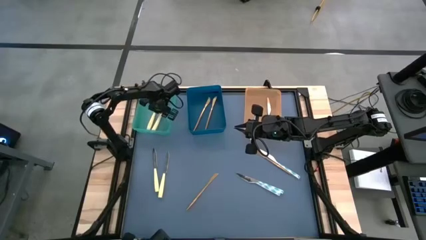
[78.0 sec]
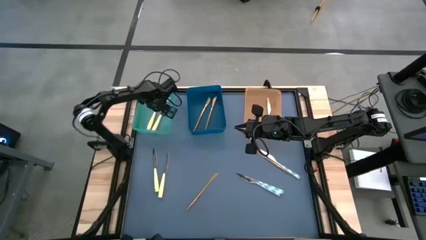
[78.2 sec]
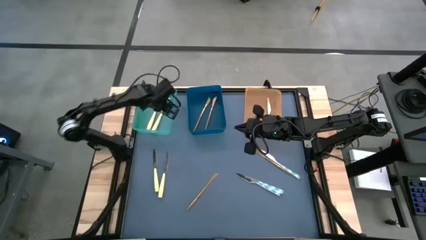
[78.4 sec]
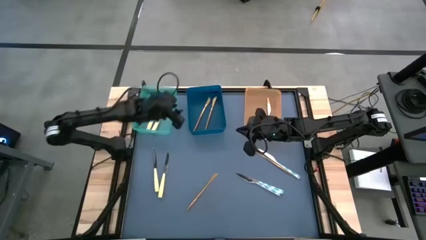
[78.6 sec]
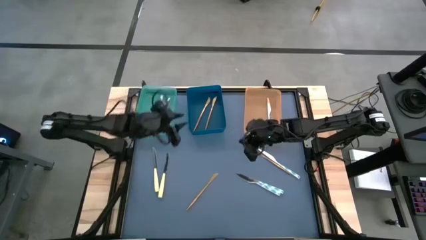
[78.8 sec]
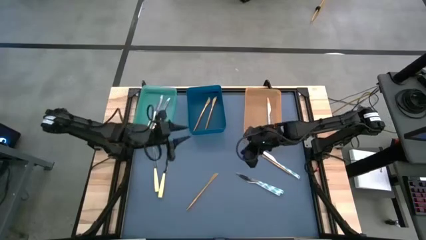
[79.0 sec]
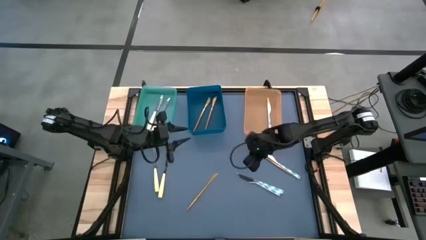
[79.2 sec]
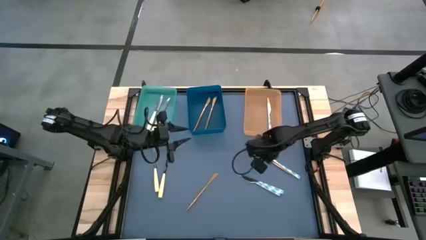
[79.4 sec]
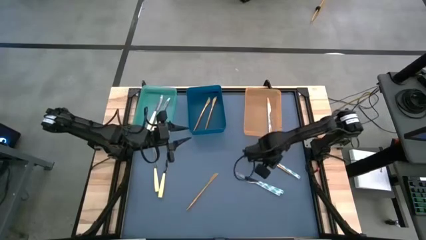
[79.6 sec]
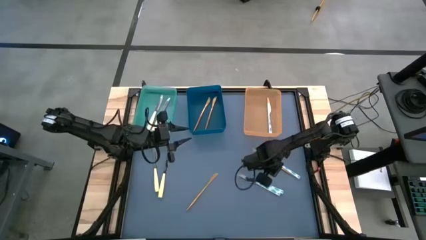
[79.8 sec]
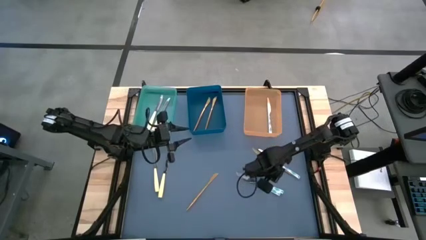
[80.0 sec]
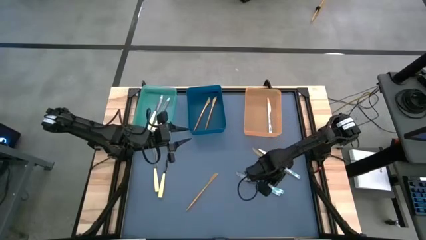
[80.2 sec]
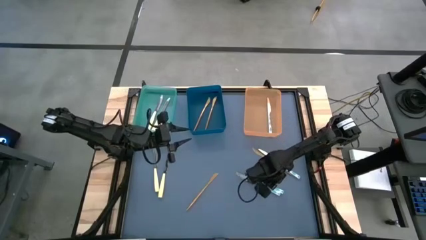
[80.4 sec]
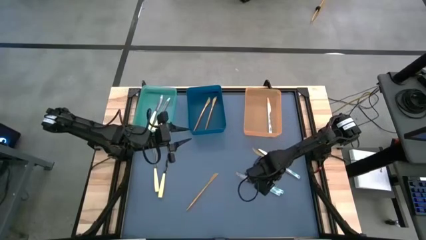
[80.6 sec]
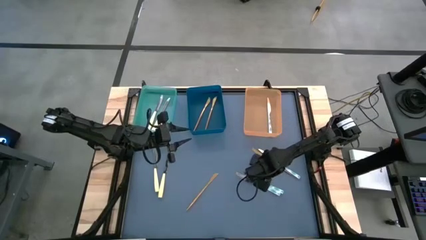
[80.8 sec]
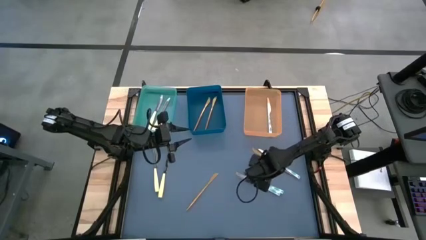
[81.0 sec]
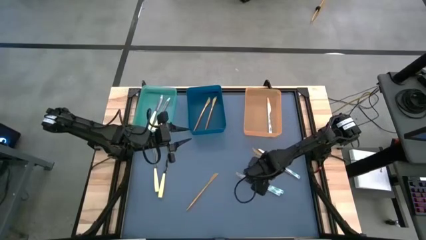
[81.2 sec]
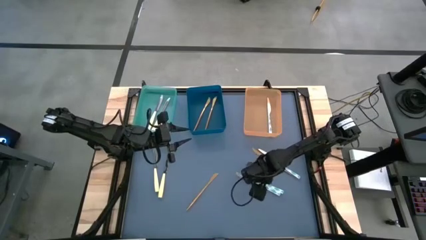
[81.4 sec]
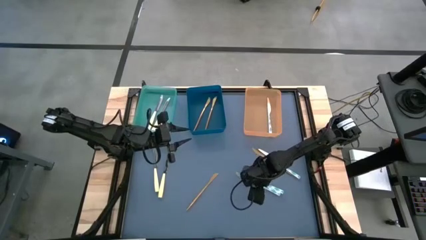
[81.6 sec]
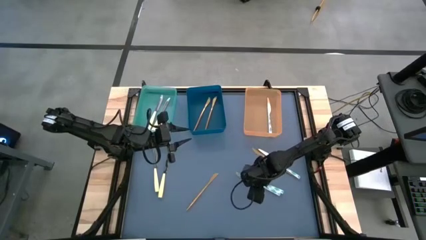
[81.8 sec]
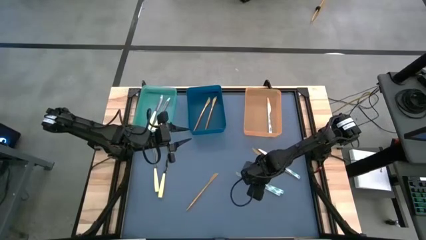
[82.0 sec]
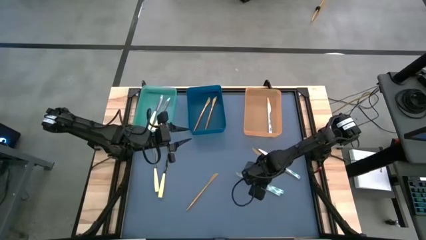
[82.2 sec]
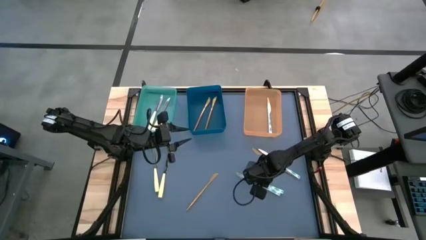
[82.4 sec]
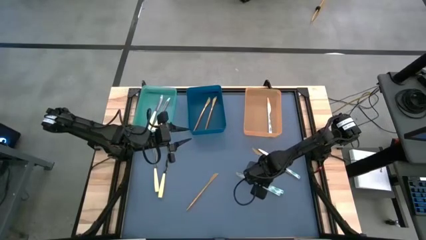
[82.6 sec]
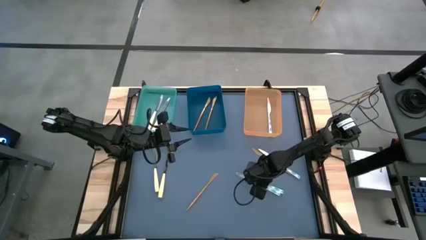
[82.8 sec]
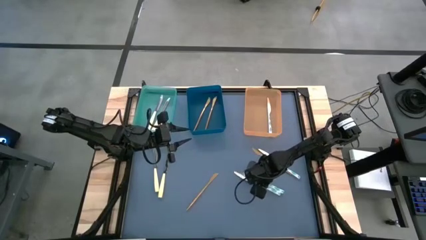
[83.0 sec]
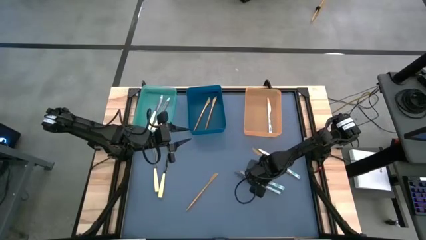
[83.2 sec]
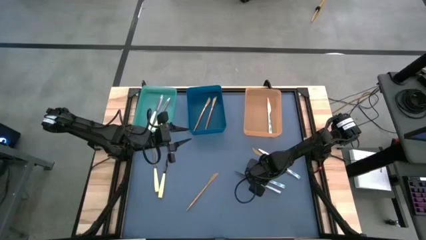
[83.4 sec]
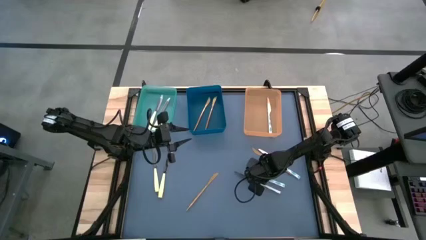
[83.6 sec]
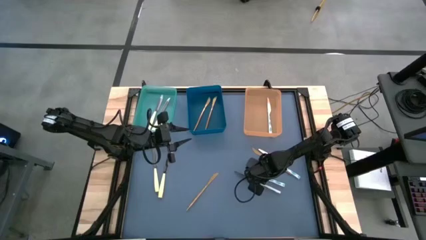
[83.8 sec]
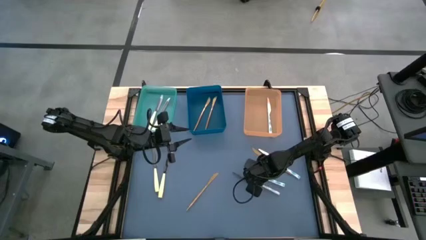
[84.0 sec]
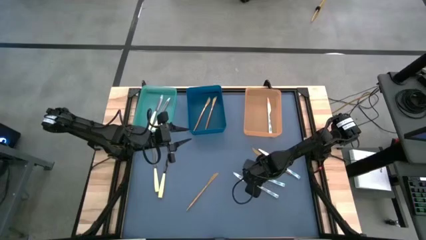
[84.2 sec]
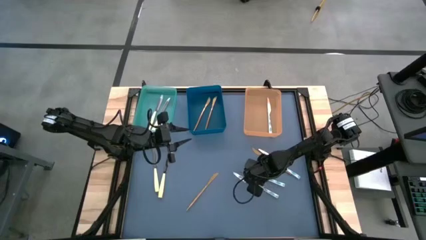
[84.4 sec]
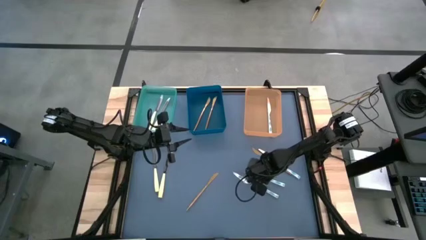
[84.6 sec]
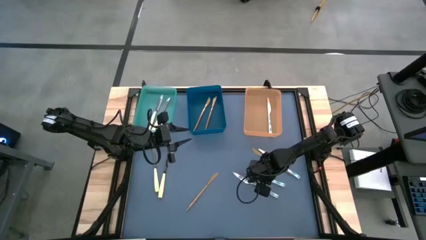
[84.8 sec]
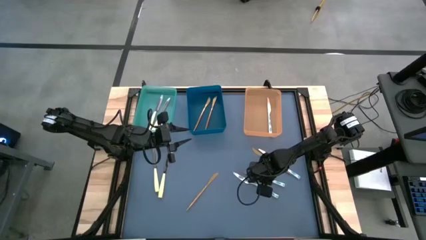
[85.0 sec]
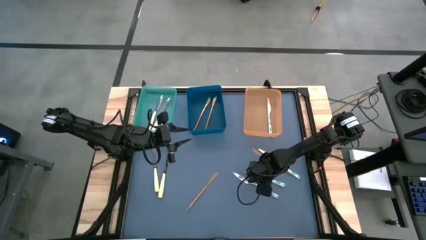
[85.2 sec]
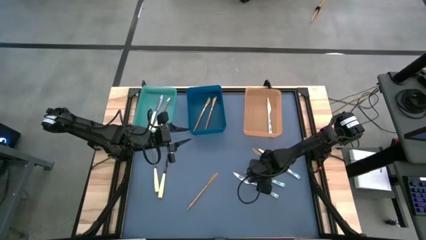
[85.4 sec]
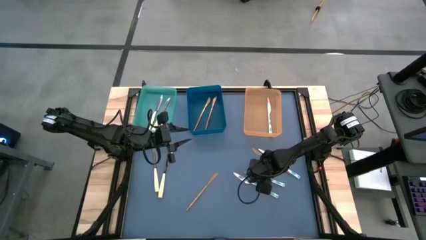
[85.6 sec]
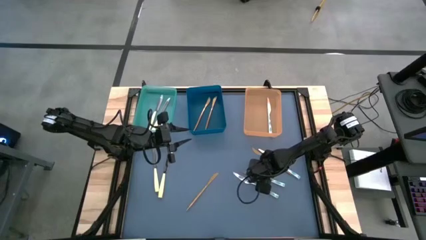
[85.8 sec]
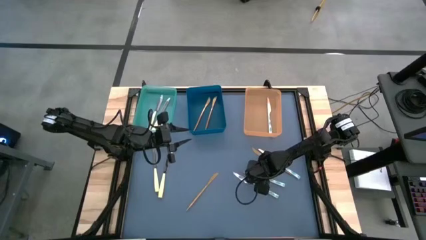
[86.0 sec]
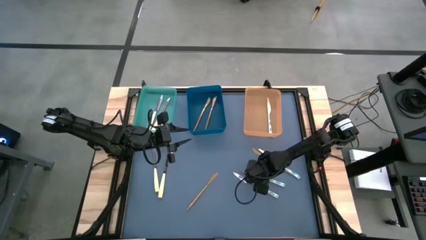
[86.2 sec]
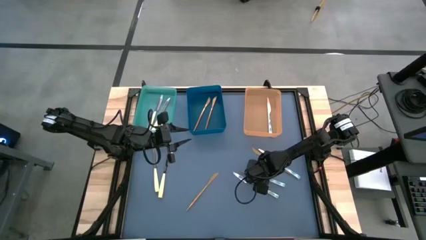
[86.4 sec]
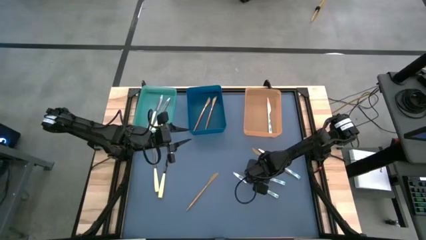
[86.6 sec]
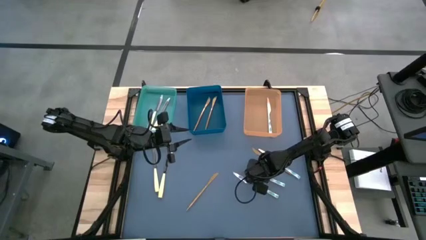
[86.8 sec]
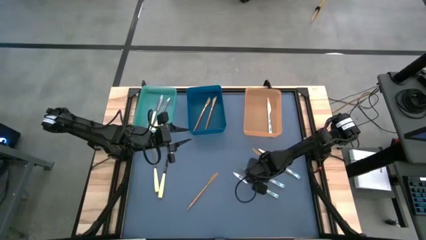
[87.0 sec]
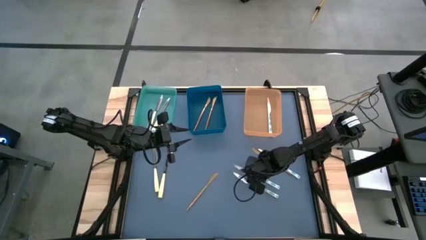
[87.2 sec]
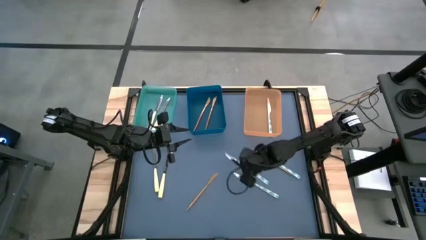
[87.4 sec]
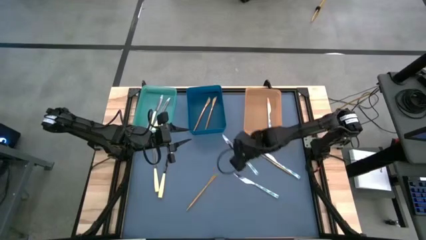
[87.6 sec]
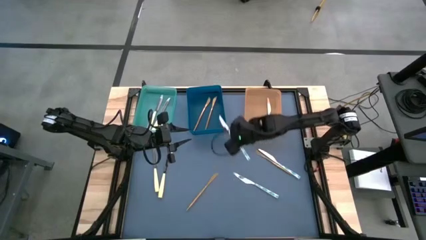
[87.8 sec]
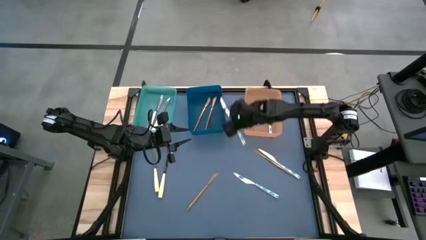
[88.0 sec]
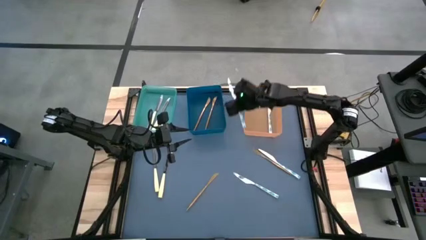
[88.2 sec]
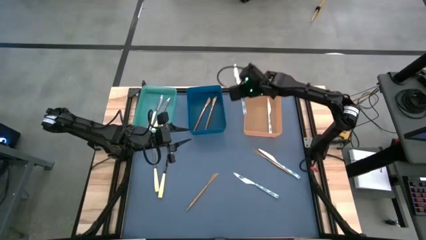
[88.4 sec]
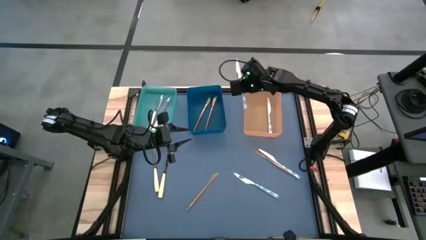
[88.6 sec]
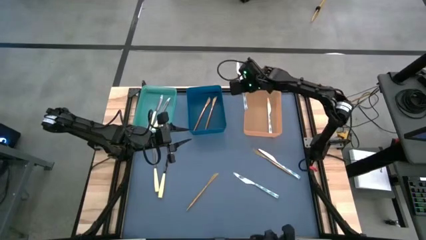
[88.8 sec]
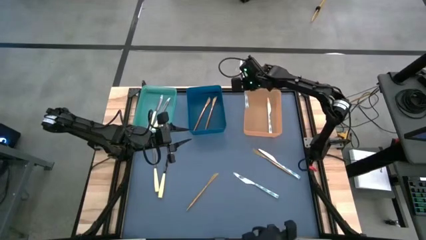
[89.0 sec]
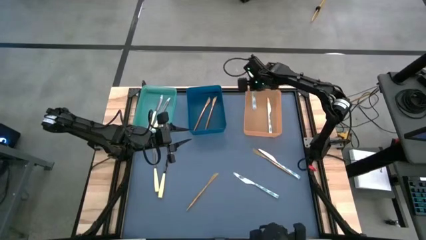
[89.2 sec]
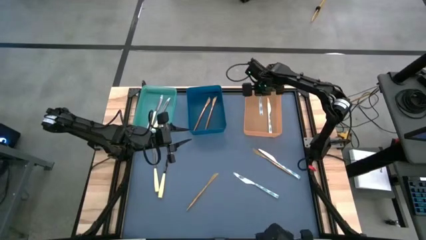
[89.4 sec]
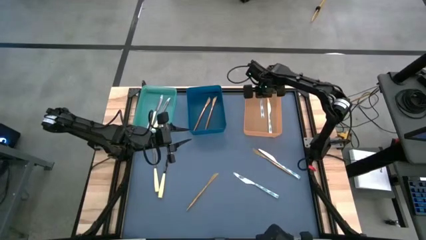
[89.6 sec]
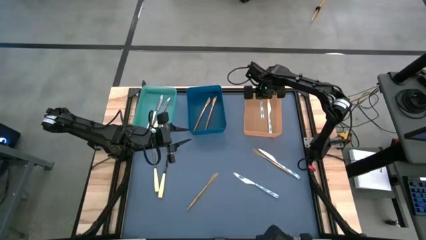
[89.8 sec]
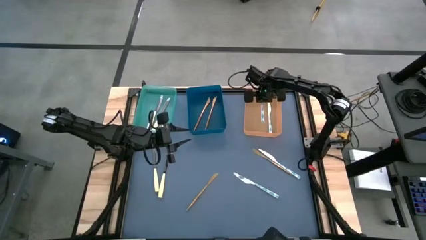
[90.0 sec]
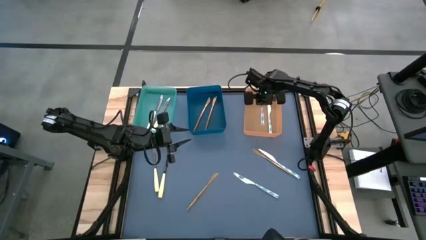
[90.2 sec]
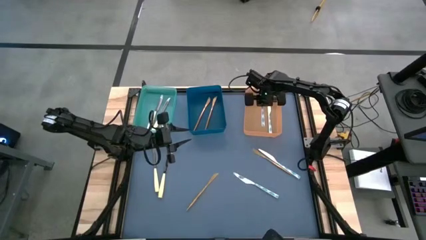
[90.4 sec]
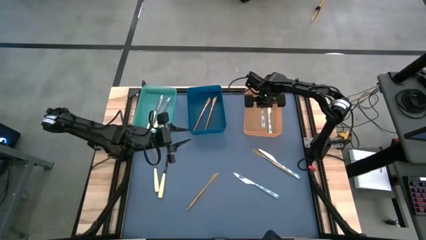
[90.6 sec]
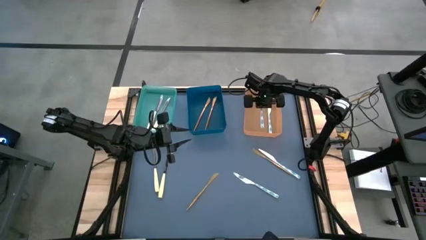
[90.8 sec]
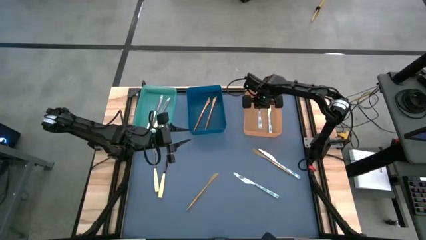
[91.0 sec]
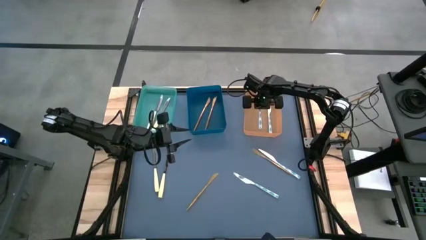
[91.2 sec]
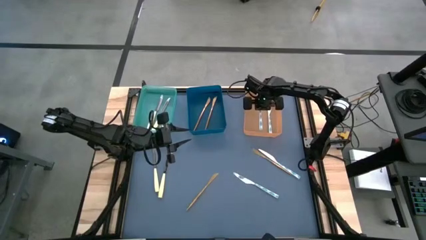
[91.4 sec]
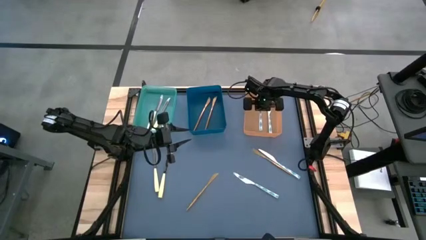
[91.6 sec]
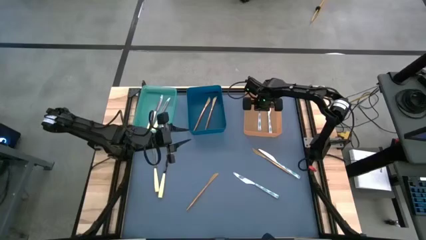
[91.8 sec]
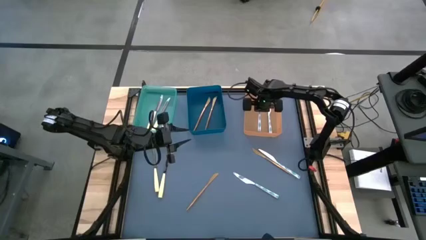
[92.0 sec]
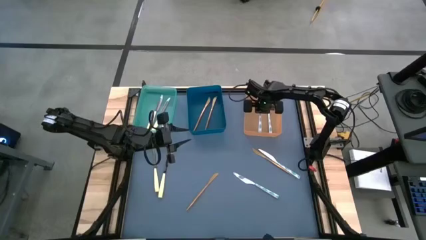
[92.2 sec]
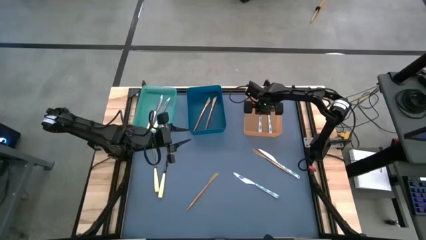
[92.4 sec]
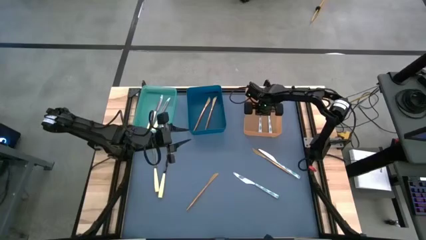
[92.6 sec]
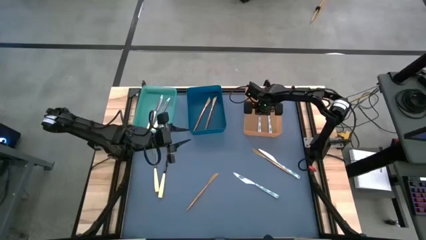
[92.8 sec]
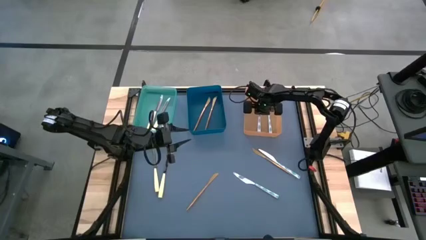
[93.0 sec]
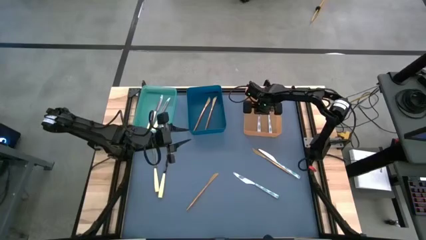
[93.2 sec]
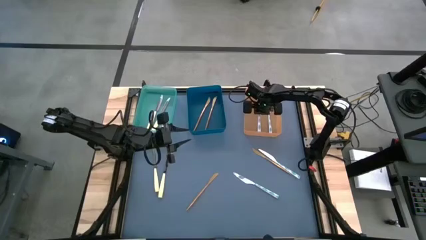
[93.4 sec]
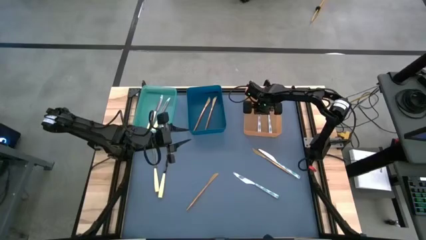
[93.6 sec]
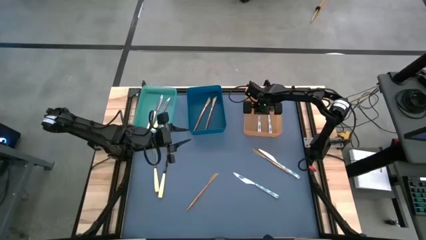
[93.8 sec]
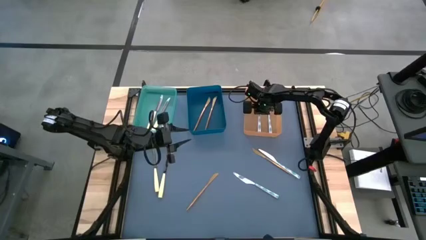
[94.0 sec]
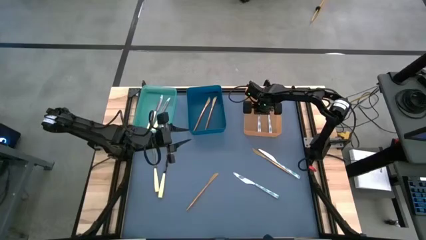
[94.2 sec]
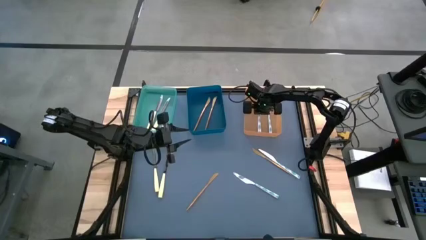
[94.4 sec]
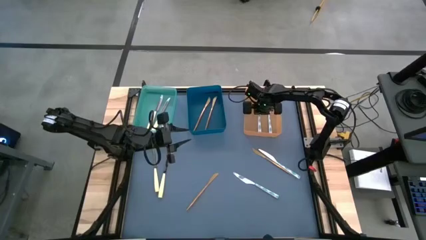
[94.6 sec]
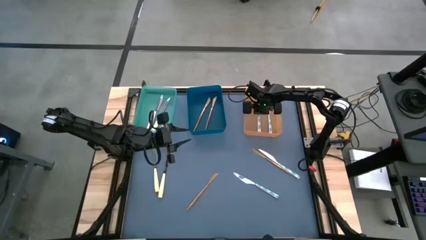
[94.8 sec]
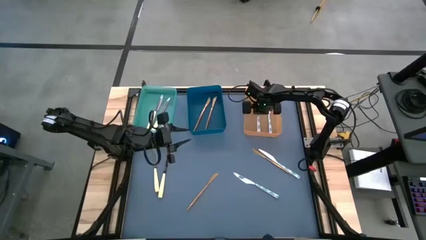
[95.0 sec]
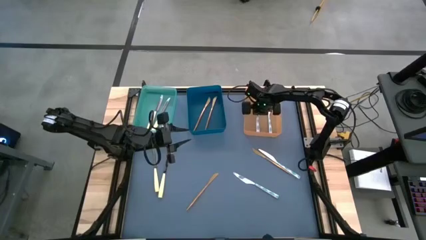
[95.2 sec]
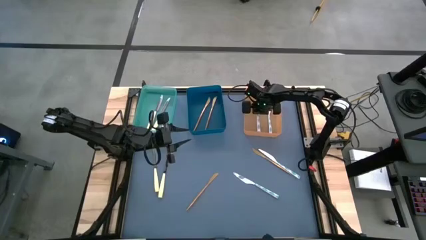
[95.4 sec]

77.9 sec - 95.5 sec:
Task: Sort silverware by color (type)
Put the white patterned table knife into the orange bin
